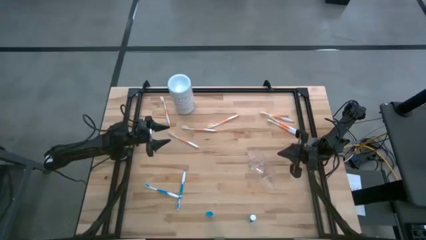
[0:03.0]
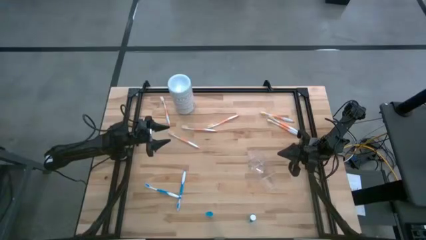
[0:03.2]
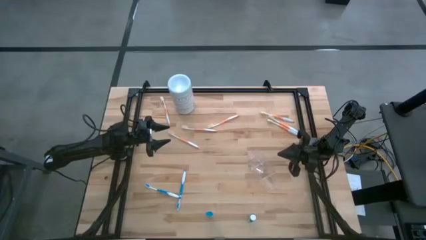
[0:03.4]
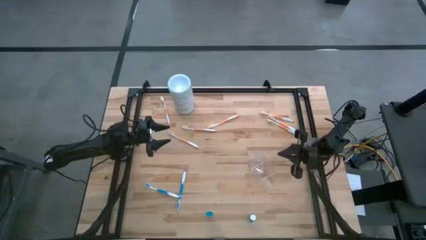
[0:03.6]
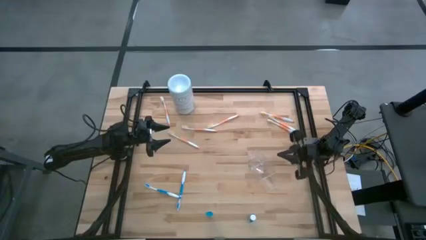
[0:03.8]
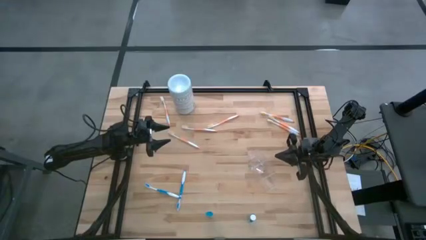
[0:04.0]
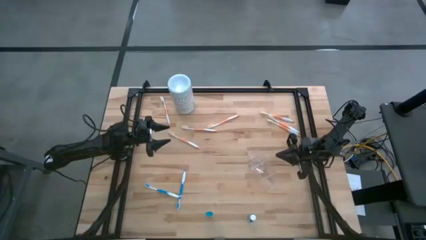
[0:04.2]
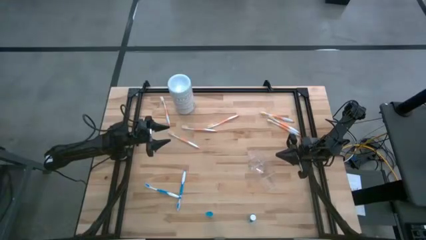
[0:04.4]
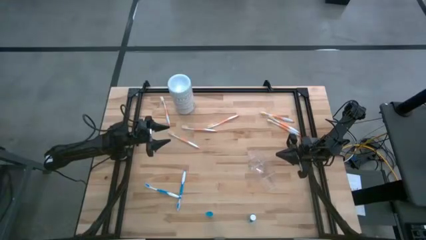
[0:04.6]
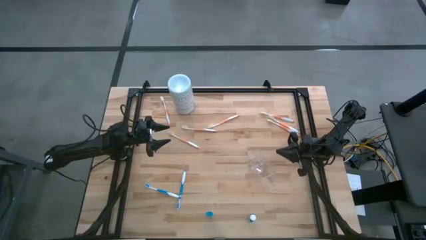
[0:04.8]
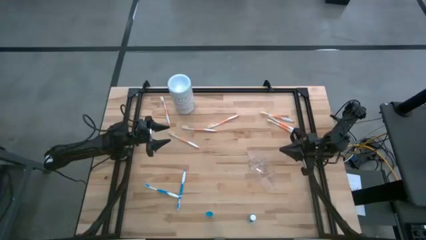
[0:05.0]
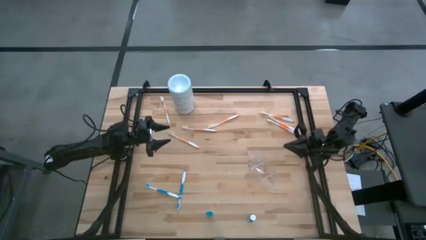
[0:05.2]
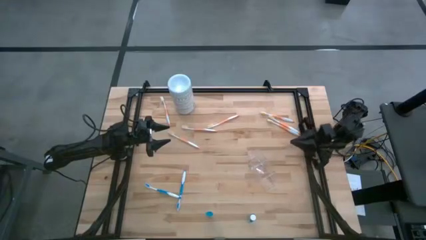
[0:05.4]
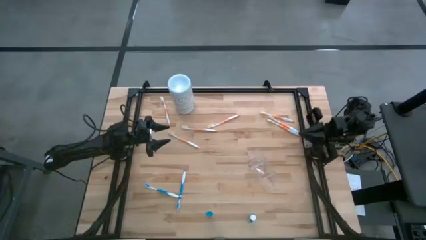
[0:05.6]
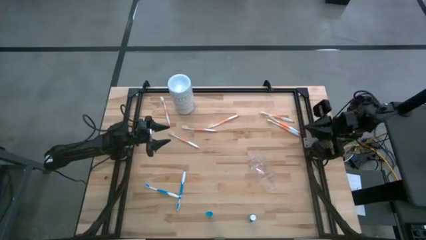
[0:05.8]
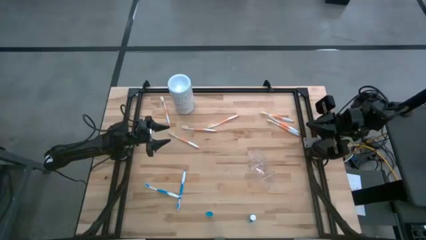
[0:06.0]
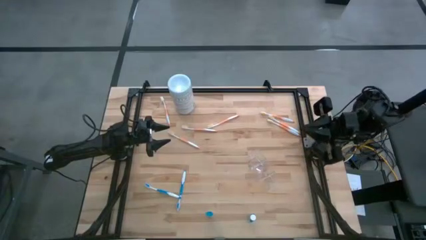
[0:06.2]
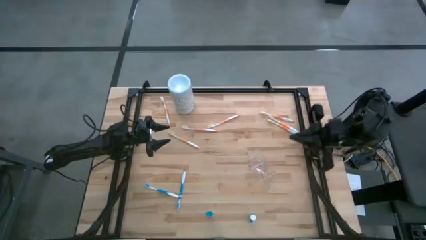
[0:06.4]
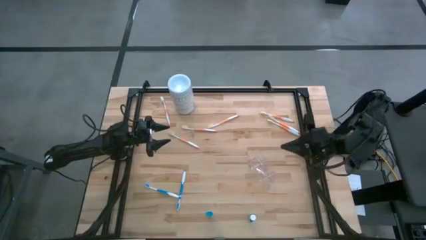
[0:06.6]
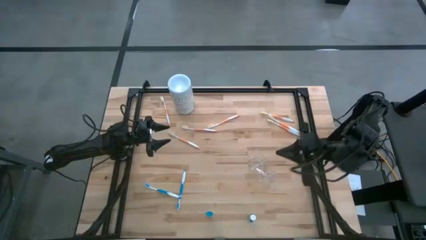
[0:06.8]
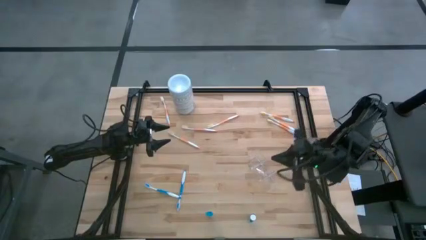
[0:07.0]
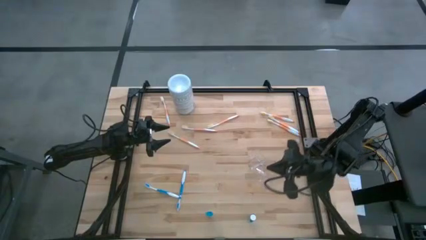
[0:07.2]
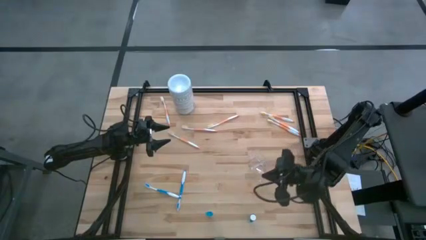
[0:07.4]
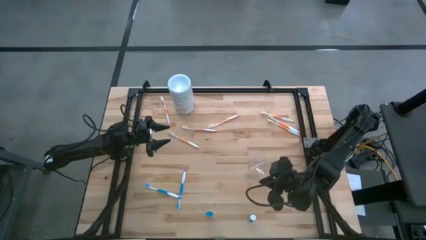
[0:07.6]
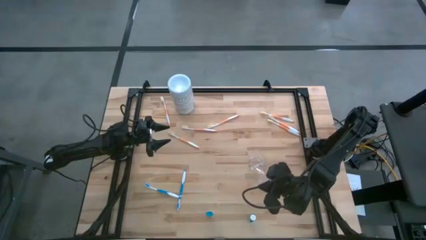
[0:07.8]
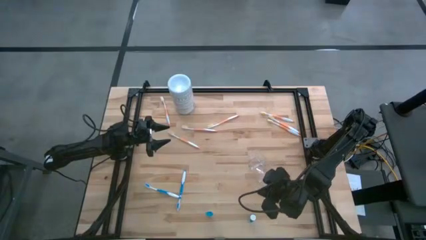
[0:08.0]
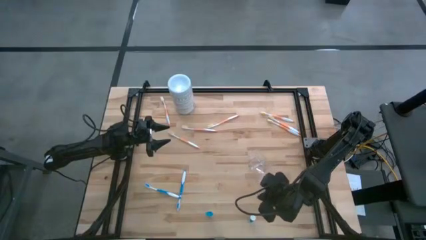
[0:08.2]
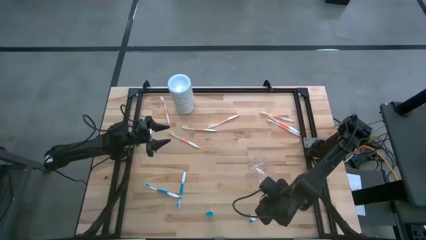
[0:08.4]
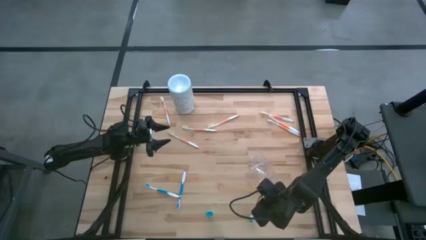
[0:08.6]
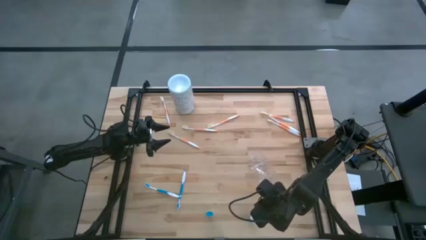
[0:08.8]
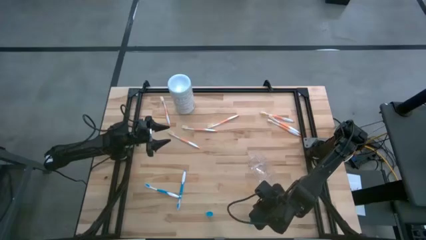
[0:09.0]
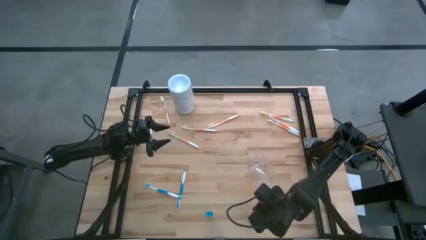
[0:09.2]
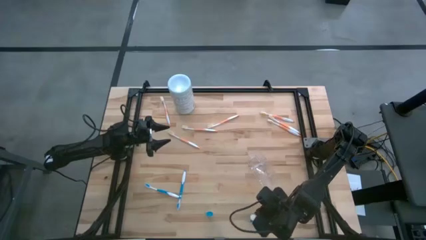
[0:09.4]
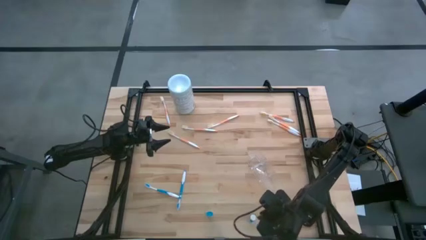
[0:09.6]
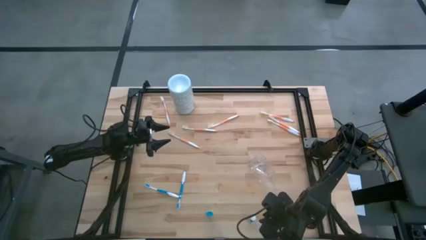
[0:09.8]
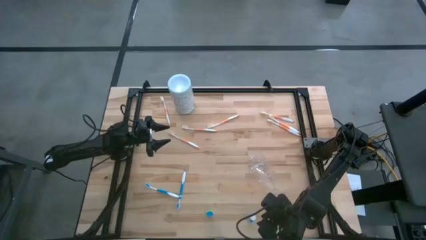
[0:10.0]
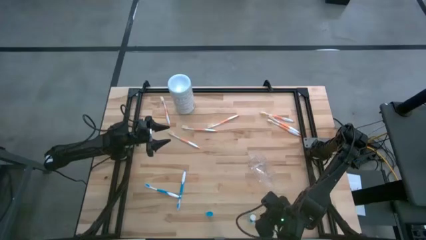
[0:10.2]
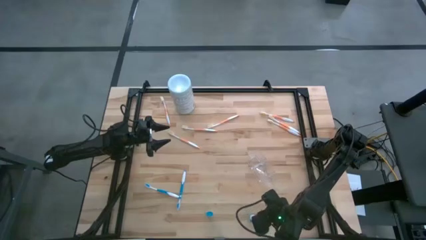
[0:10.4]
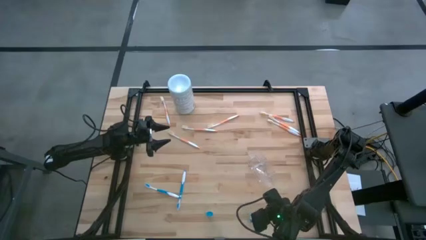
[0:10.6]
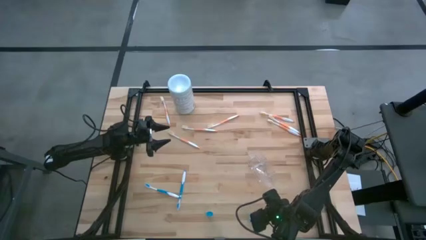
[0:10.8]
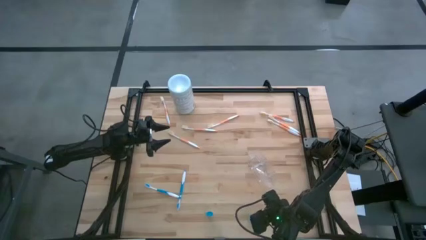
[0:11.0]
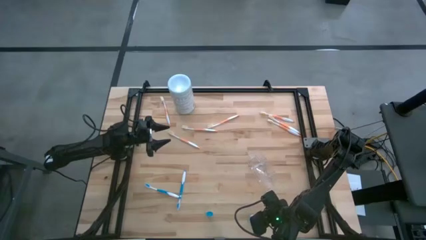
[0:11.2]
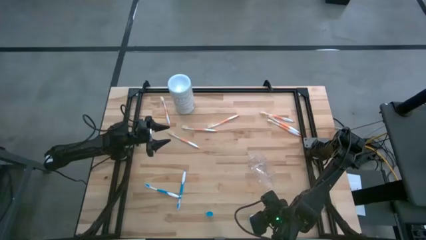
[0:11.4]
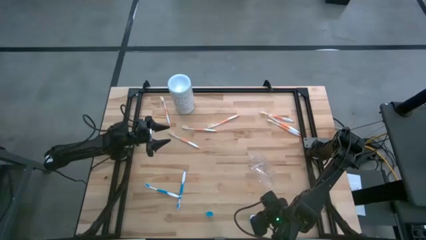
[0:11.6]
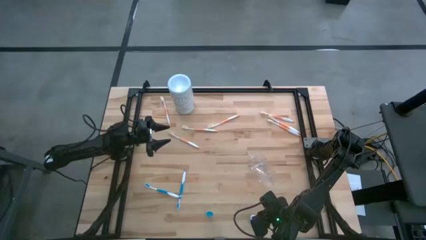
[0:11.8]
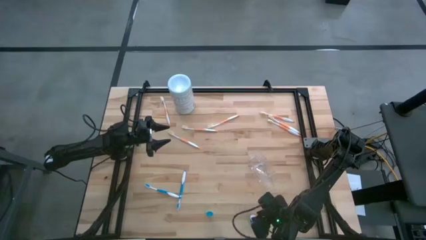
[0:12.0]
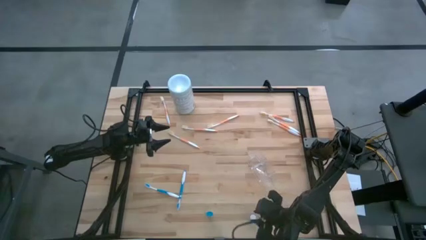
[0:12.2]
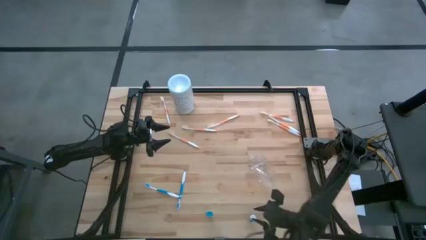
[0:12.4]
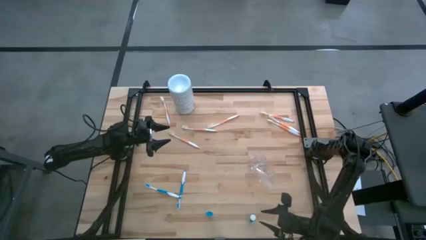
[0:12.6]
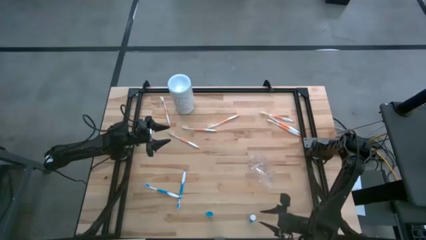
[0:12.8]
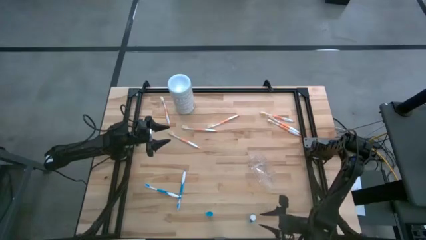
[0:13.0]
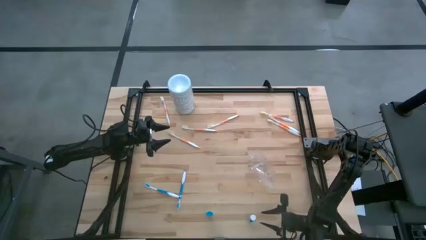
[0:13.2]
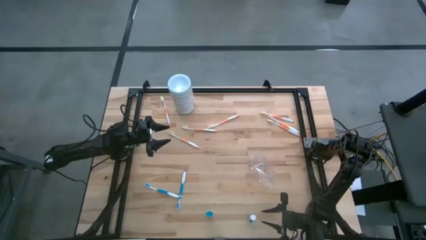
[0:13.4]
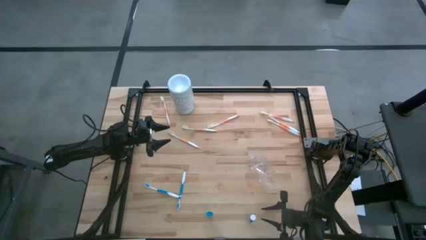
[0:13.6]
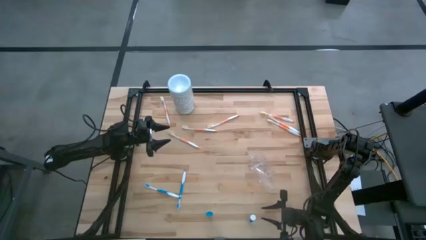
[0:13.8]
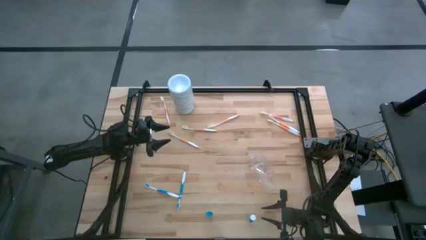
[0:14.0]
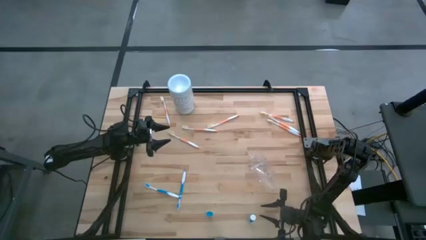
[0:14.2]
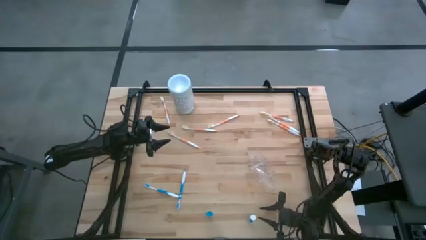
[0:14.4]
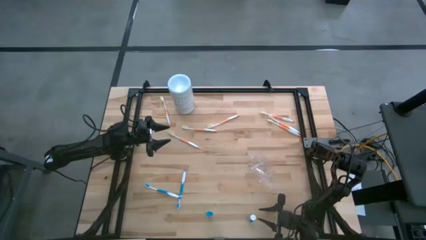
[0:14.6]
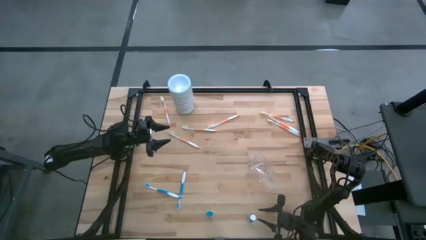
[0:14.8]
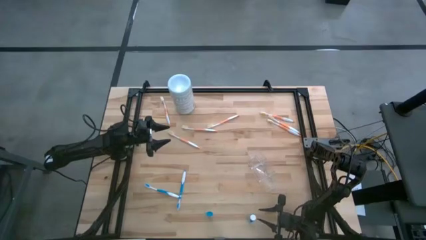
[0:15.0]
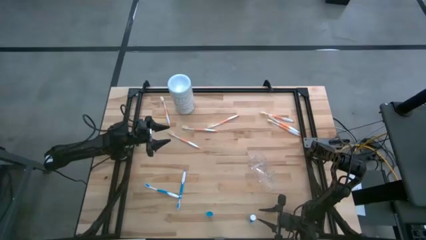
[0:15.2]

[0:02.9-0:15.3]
Task: Pick & Place toothbrushing station
Put the mouthwash into the middle section of the transparent organizer

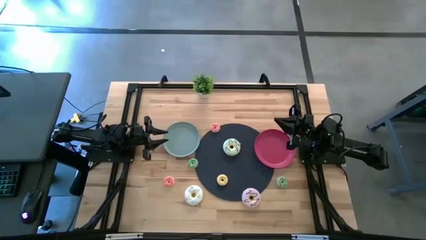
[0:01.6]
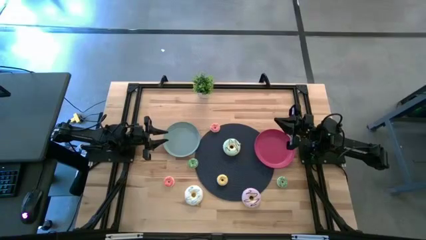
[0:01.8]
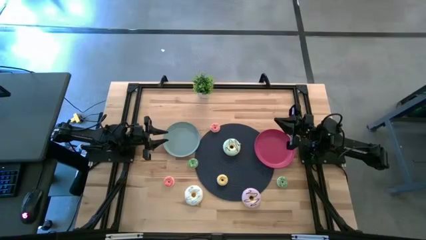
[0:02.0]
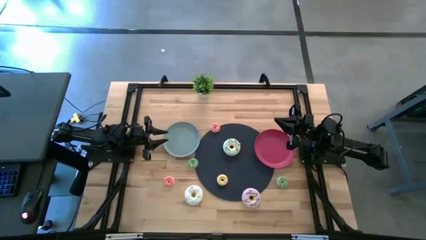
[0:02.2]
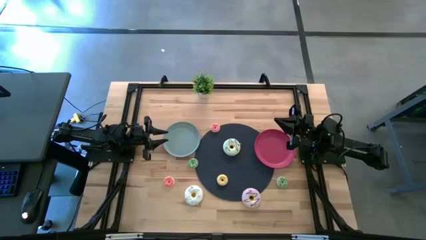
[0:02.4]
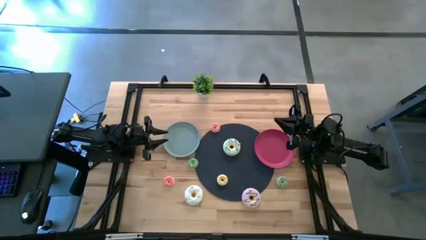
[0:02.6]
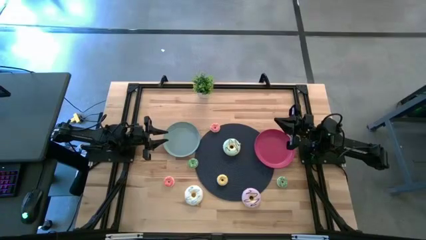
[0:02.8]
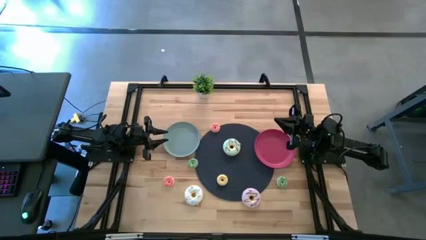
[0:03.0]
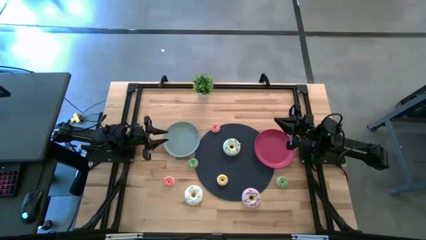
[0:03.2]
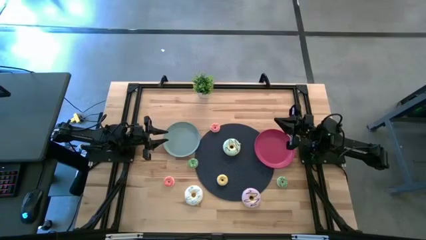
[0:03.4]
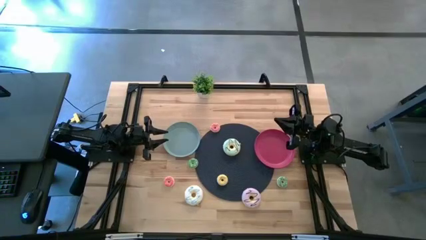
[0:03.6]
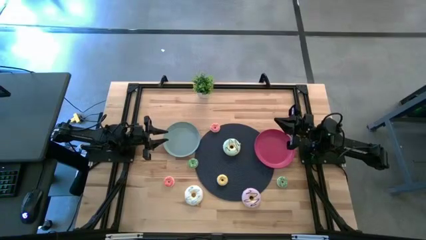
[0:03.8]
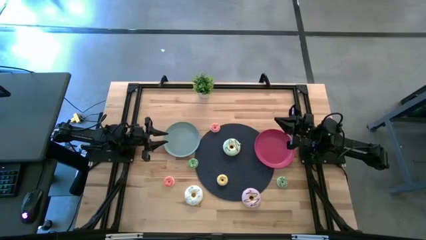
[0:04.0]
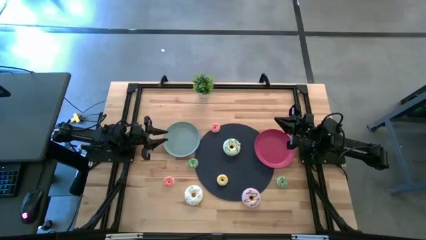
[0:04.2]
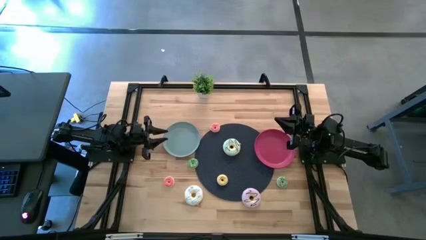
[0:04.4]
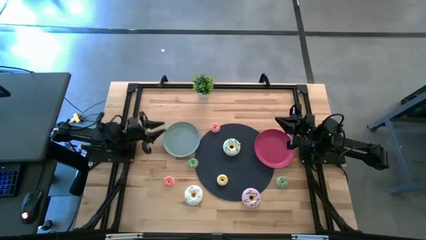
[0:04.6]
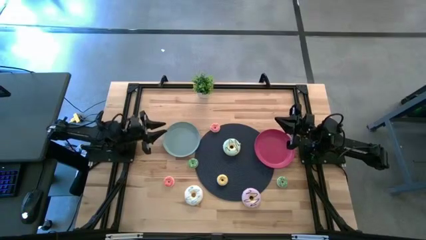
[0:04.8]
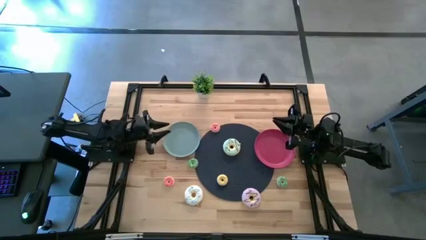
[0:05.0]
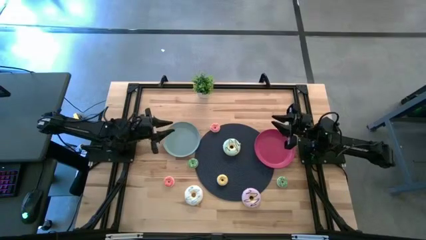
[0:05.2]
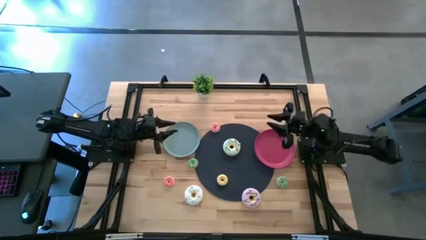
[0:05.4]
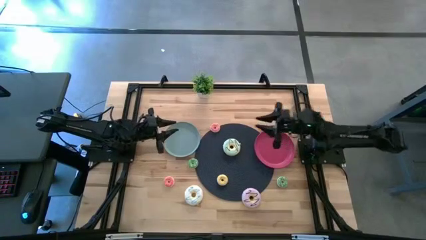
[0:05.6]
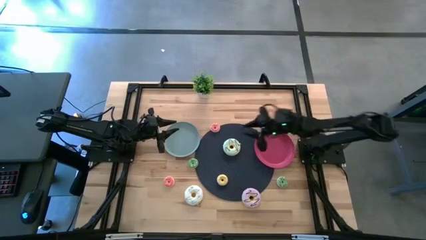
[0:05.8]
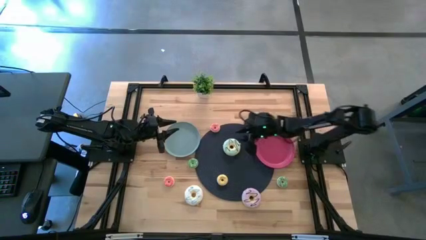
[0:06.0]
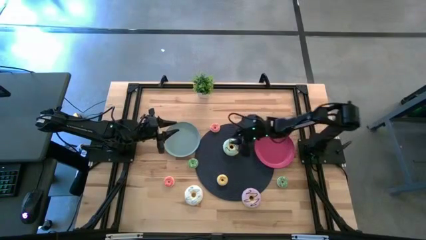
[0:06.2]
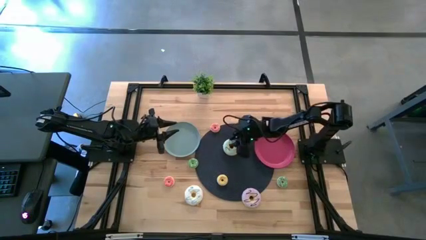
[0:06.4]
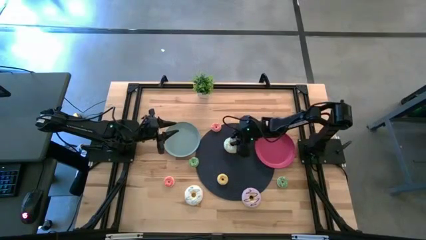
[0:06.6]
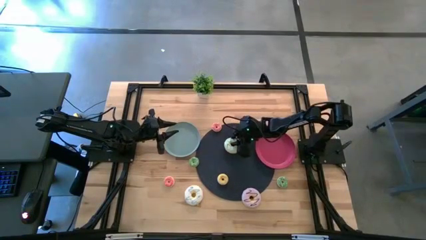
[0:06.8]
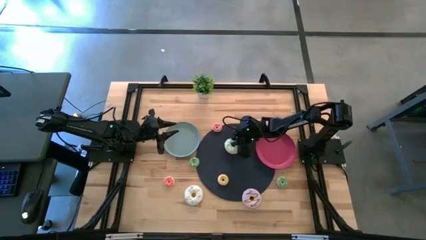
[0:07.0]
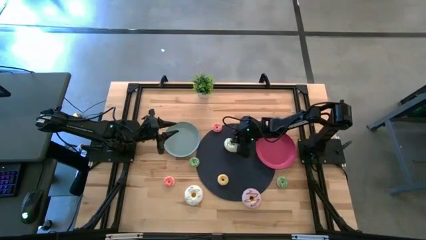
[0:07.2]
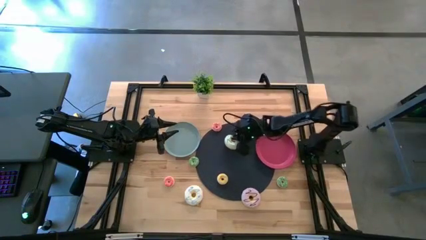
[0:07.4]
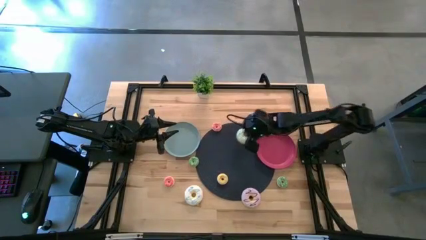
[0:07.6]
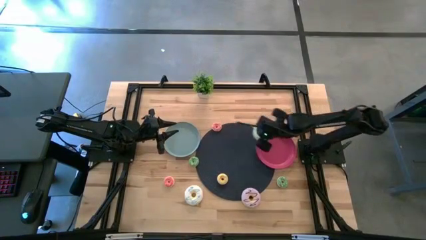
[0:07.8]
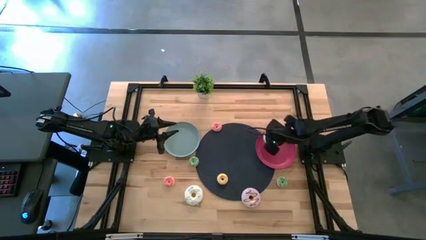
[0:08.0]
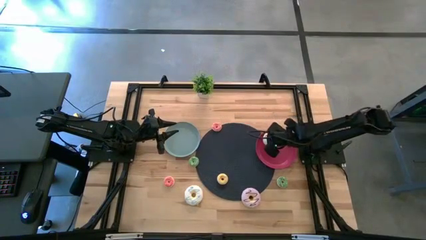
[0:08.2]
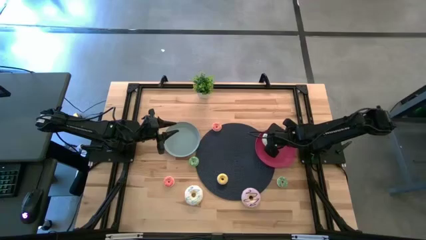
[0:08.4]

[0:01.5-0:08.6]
Task: Pick & Place donuts
Put the large blue donut on the red plate
